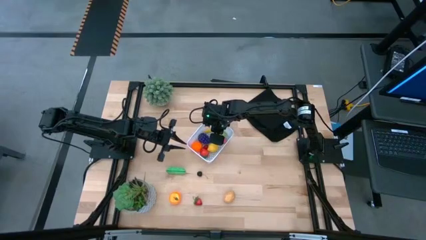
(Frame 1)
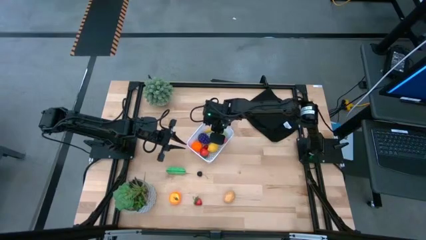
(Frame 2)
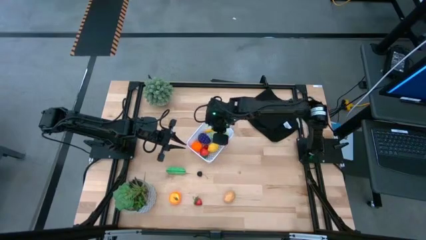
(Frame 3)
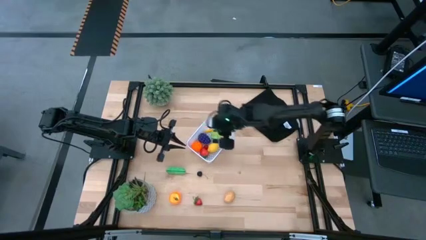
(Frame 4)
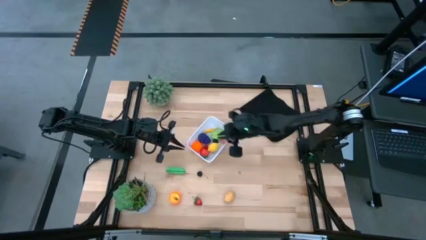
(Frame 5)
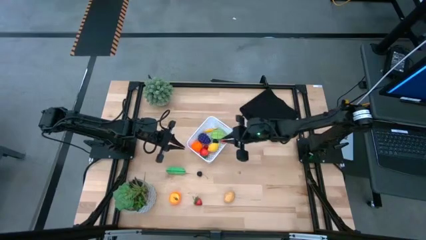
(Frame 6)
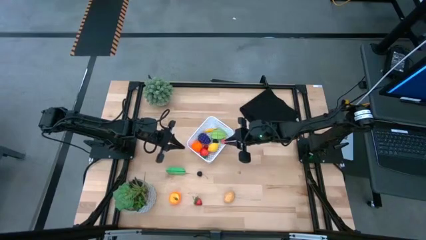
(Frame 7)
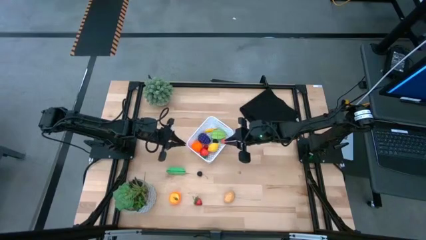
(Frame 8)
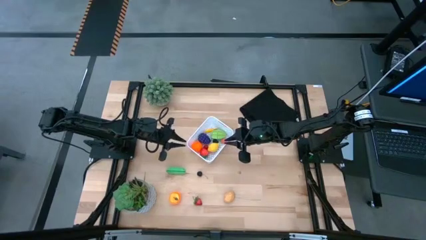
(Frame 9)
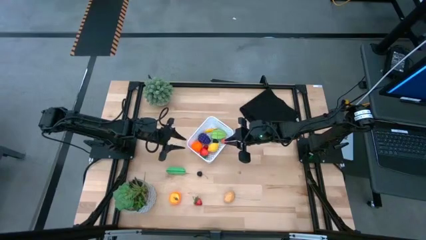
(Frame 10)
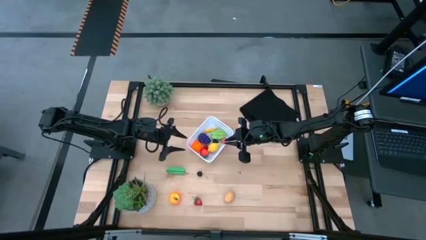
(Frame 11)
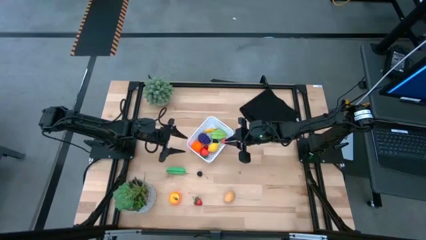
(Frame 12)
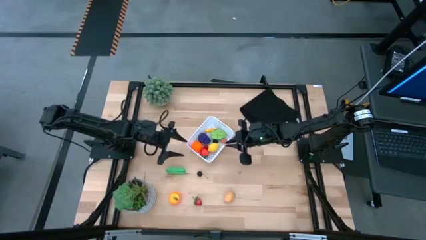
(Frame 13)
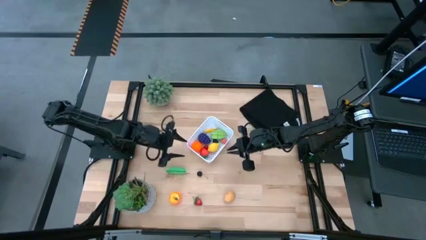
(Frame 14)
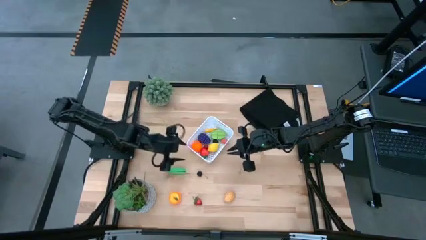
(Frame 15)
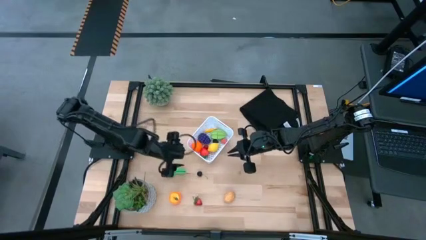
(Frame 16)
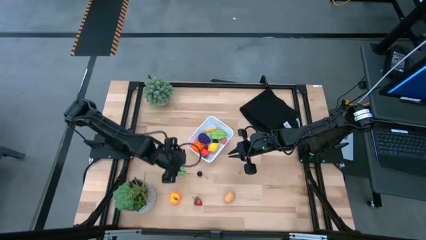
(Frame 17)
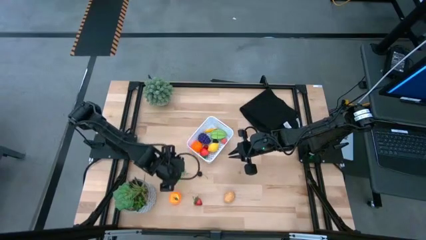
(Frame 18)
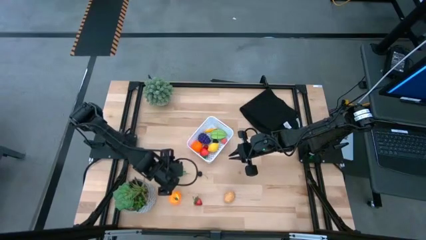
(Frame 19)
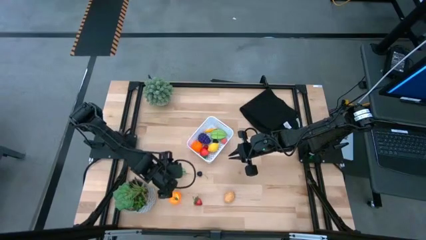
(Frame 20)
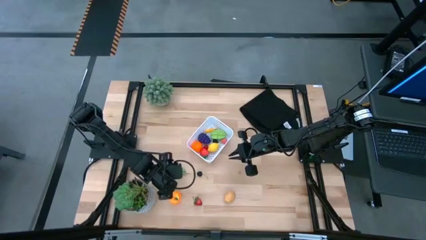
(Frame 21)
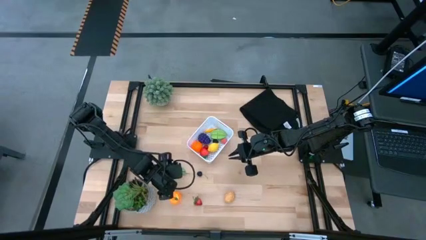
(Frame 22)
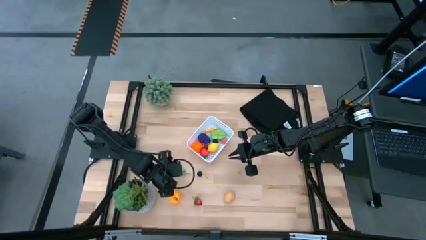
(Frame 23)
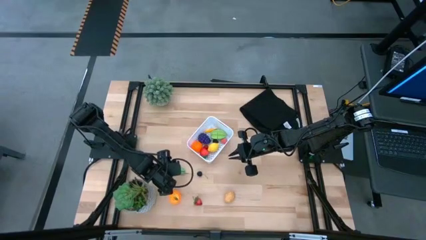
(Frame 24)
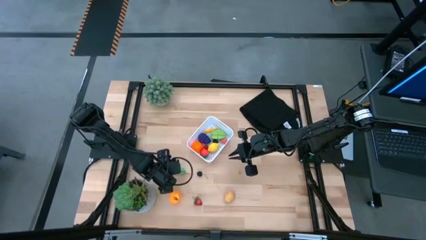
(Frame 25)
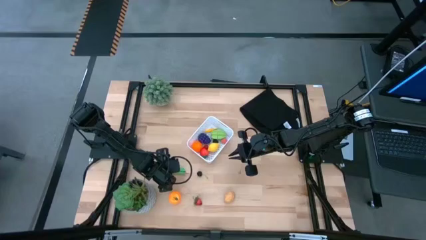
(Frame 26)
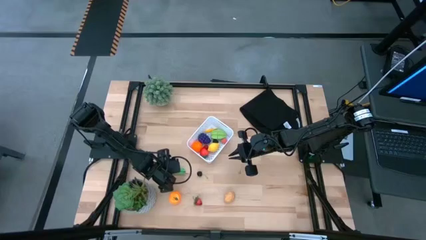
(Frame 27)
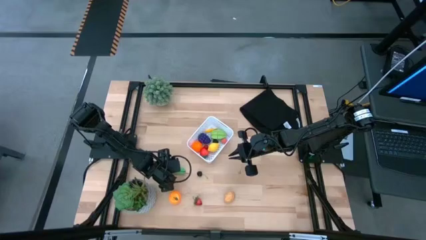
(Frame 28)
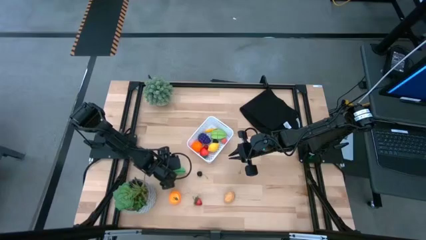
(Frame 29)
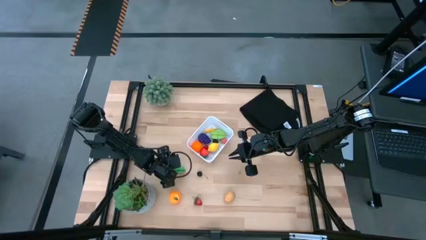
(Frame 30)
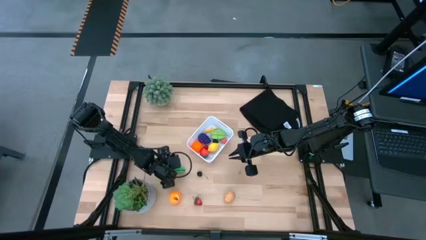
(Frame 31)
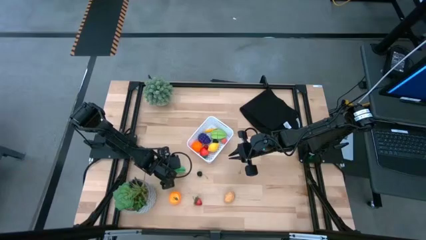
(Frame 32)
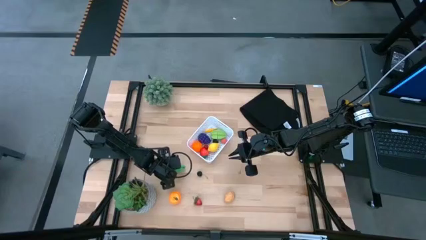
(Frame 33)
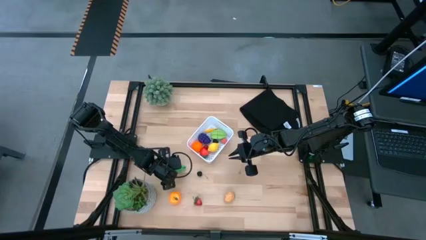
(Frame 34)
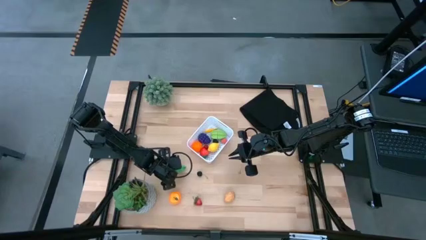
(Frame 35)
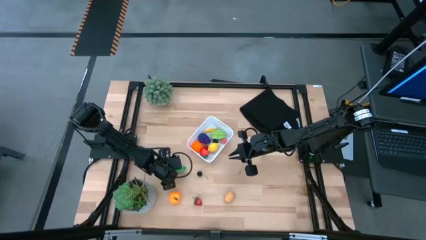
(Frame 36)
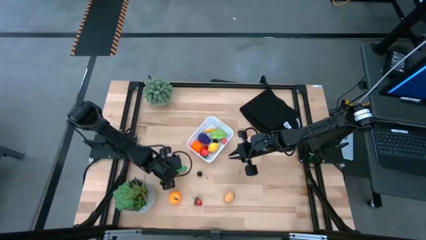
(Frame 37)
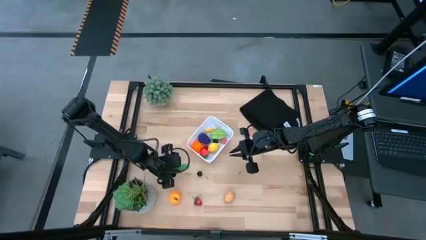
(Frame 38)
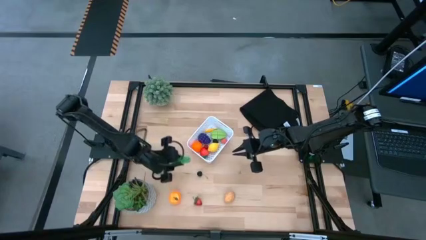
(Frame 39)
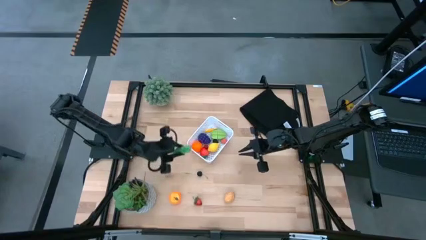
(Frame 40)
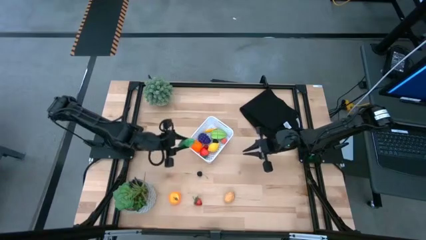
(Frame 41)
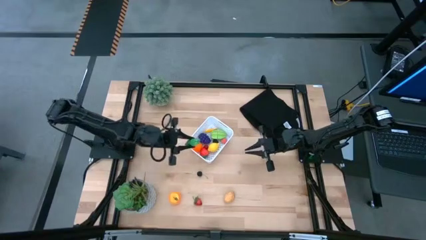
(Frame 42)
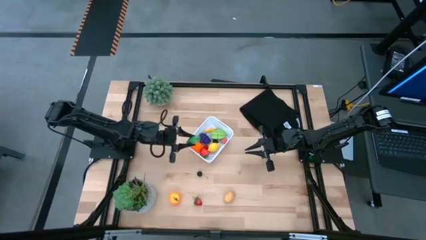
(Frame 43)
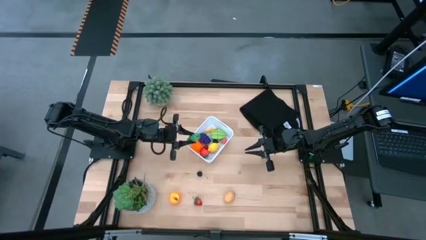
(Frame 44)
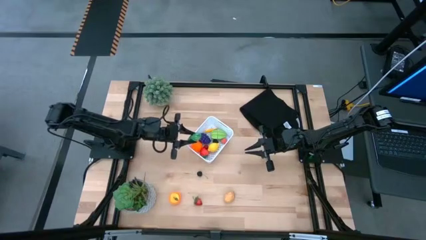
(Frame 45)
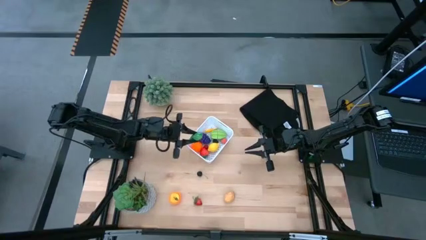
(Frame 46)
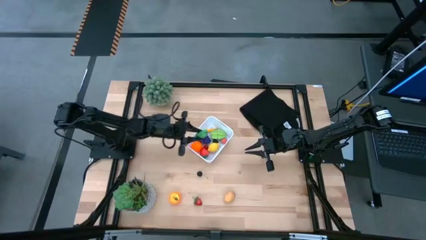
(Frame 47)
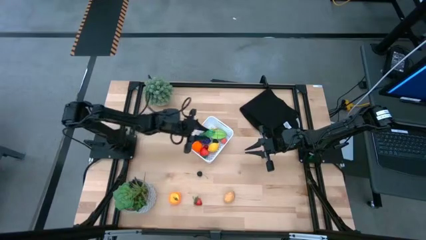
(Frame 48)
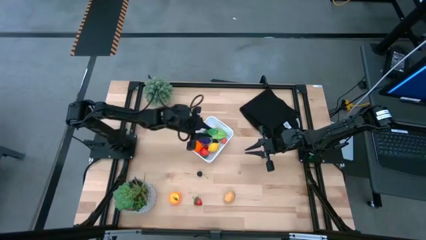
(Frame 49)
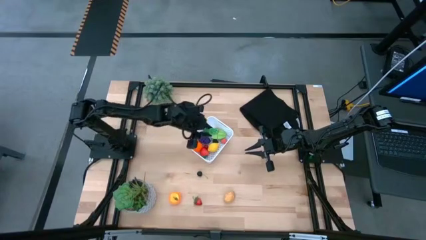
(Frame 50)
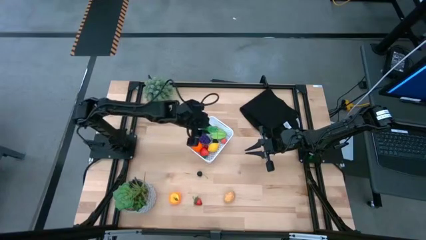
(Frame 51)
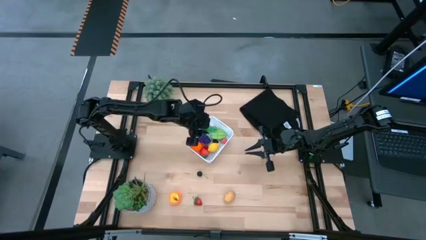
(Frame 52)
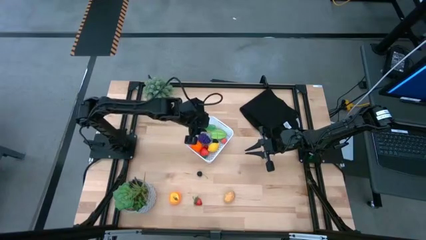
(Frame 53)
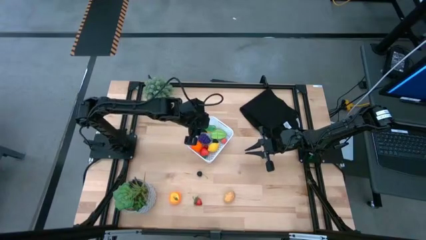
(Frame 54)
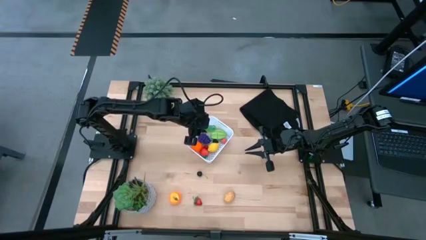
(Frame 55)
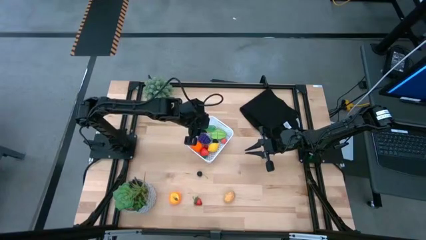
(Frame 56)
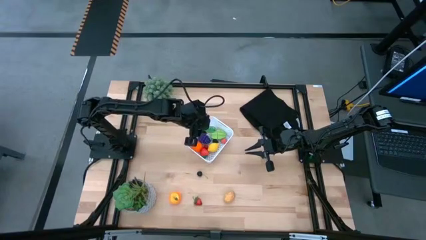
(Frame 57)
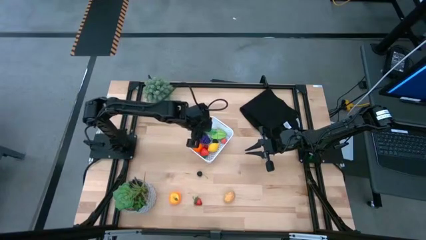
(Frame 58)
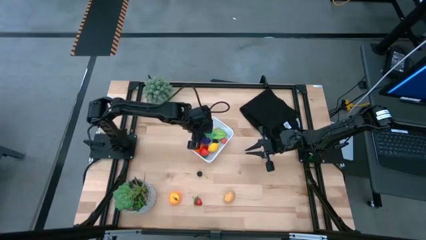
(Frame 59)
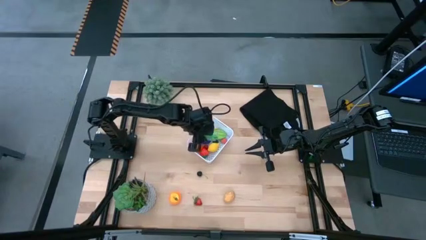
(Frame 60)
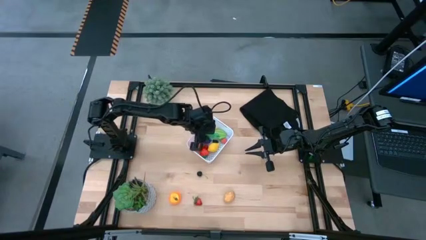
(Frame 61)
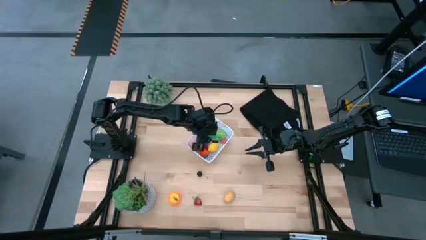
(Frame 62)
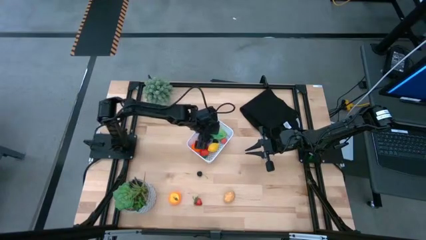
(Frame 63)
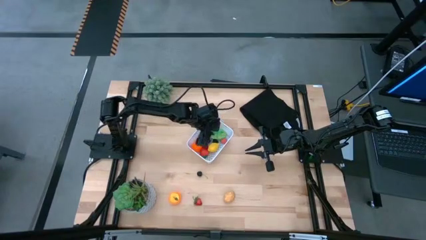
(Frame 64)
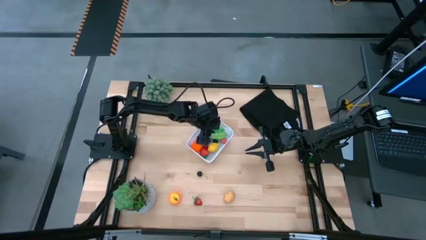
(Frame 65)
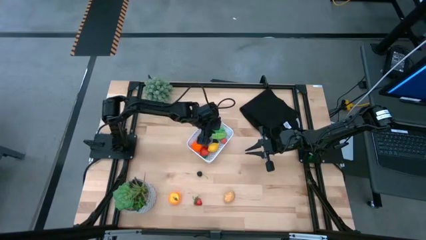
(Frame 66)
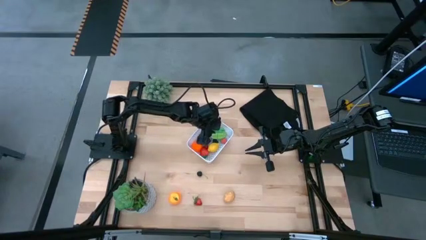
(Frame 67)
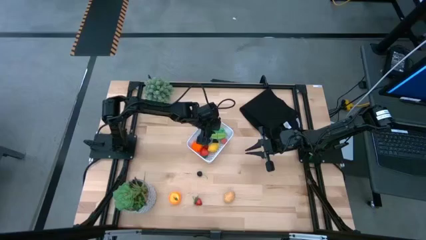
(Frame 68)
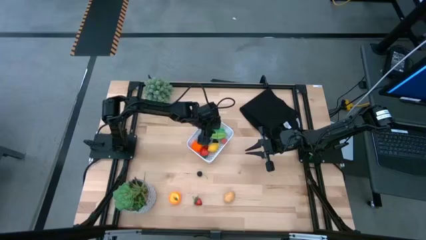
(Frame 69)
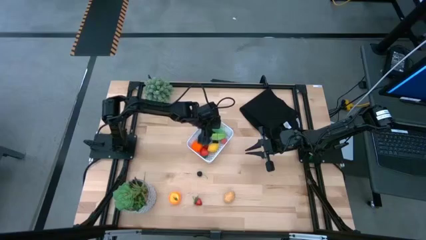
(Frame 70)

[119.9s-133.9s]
Task: Pick and placing Produce into tupperware
Put the peas into the white bin

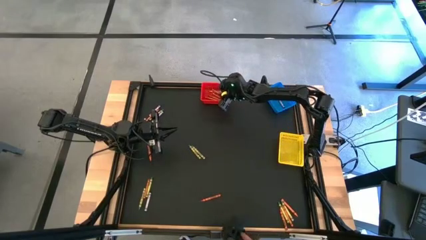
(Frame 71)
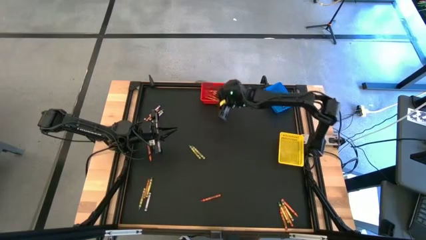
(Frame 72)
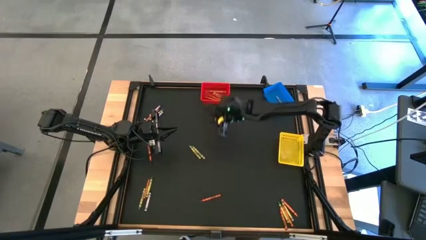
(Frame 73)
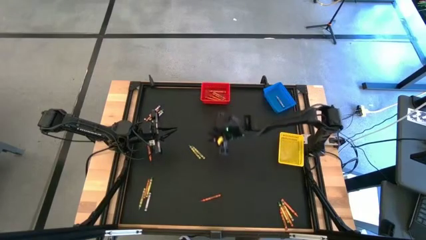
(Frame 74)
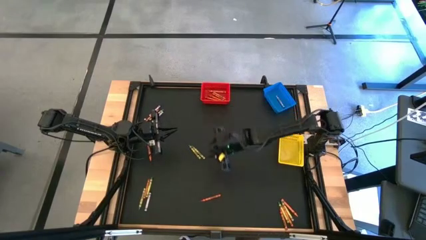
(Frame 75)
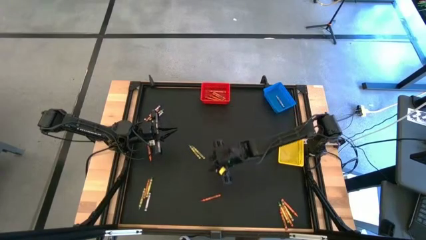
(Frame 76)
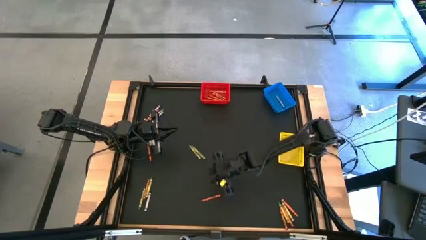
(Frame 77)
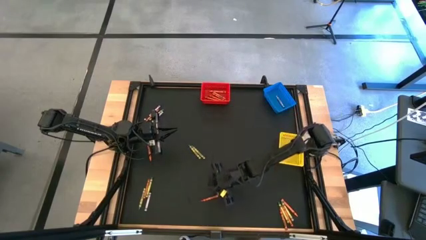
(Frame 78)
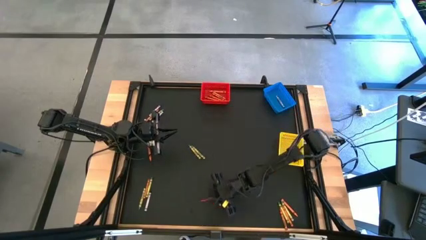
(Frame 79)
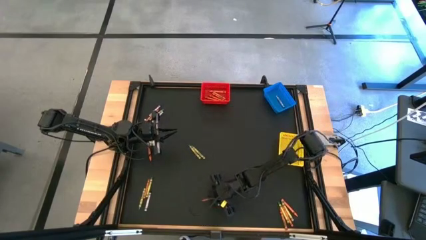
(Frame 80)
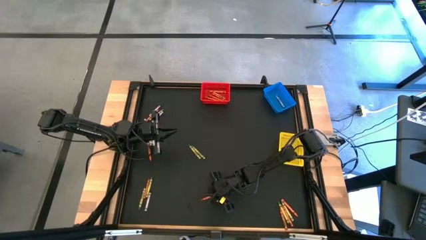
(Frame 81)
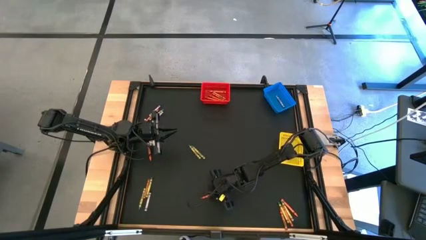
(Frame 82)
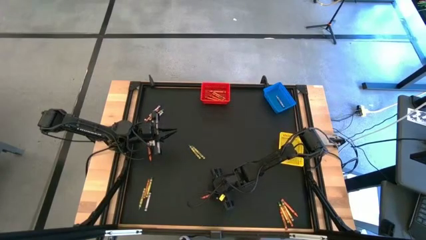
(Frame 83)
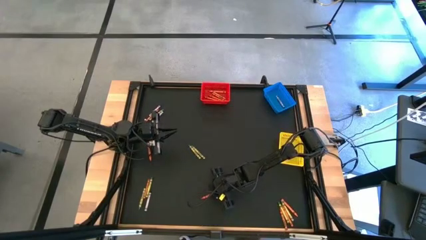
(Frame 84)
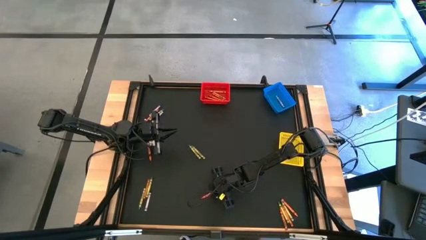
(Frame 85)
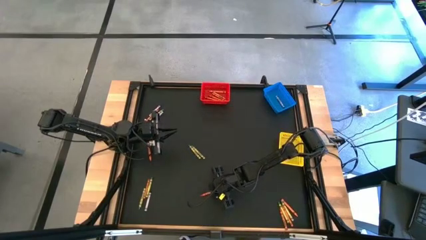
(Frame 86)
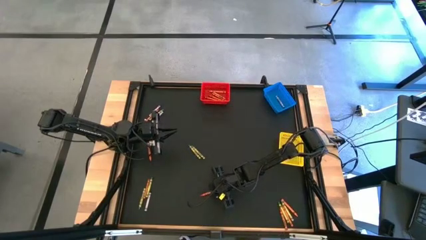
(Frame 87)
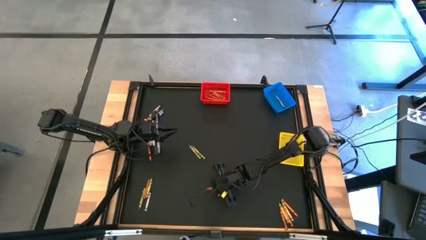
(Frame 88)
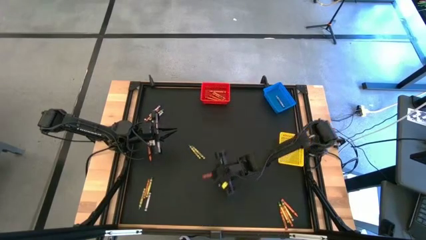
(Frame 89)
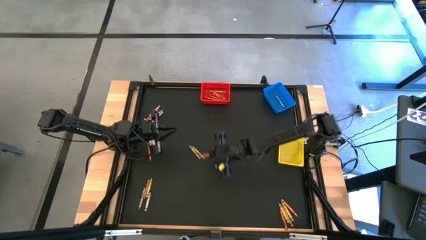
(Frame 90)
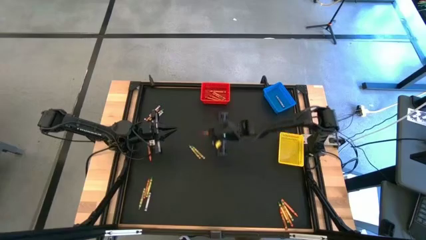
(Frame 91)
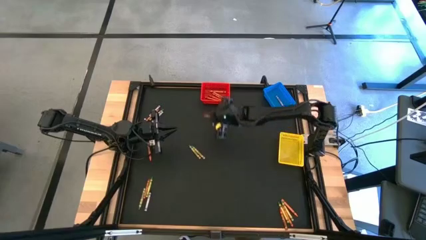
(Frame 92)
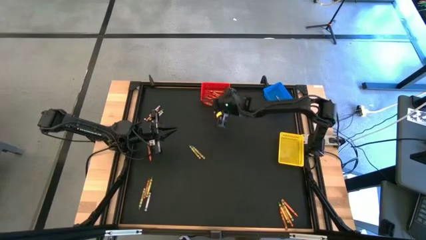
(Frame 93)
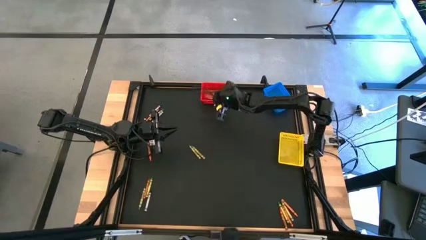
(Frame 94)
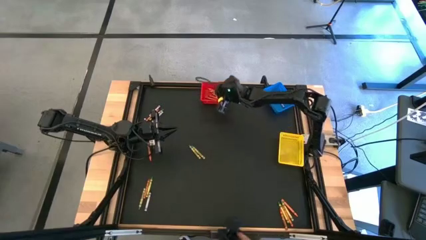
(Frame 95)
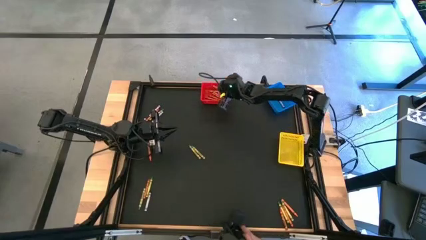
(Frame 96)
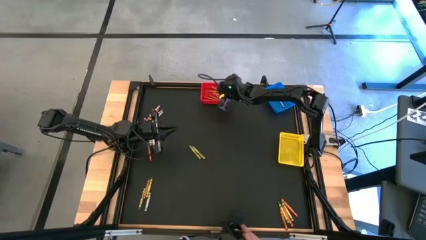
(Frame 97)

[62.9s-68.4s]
Task: Sort crayons
Put the orange crayon into the red bin
